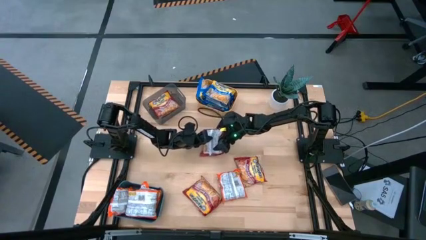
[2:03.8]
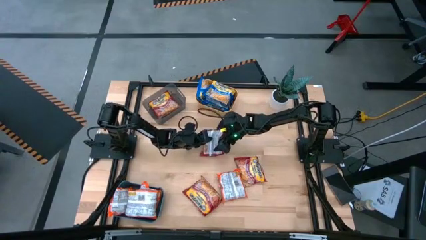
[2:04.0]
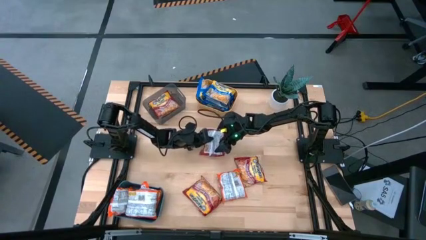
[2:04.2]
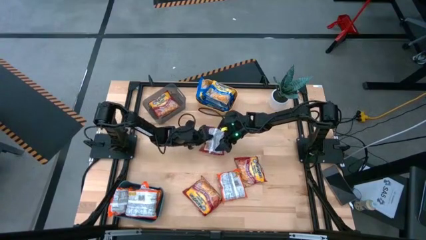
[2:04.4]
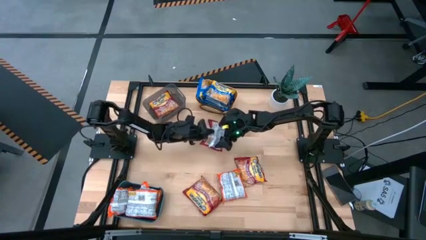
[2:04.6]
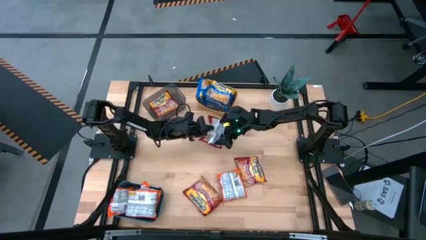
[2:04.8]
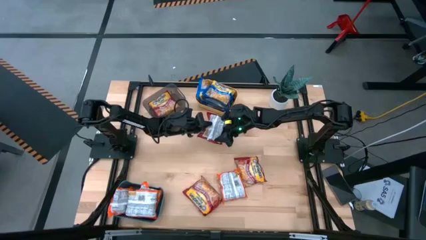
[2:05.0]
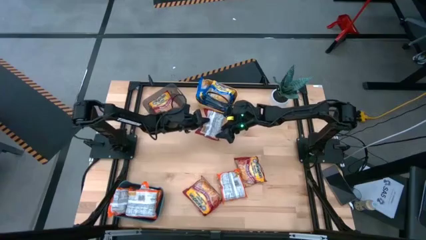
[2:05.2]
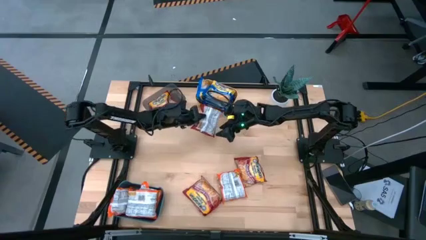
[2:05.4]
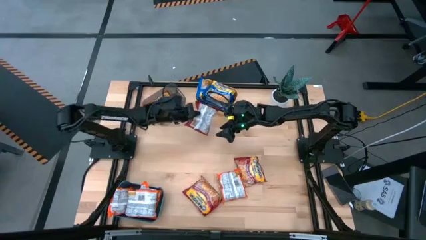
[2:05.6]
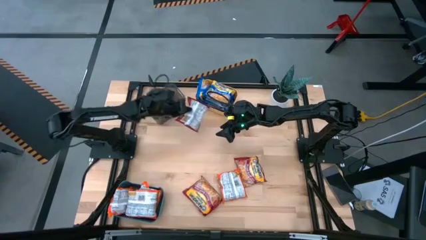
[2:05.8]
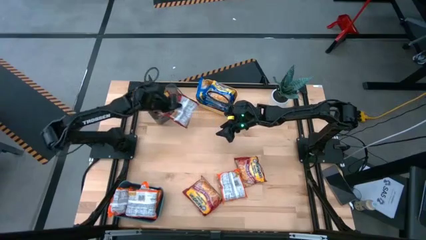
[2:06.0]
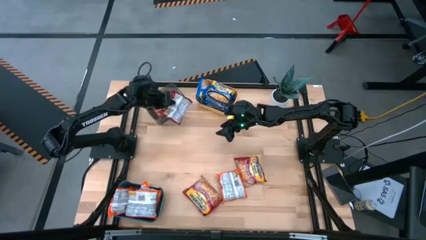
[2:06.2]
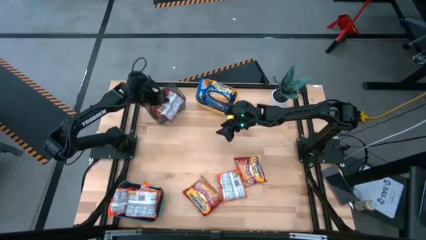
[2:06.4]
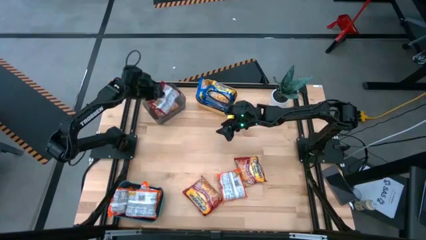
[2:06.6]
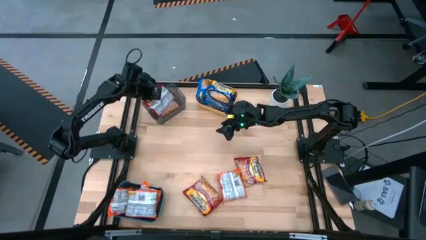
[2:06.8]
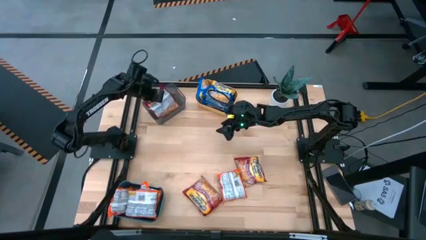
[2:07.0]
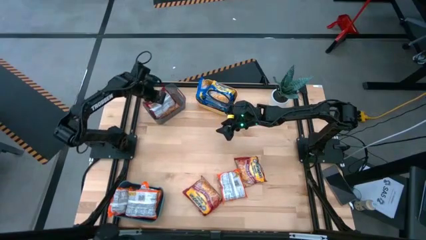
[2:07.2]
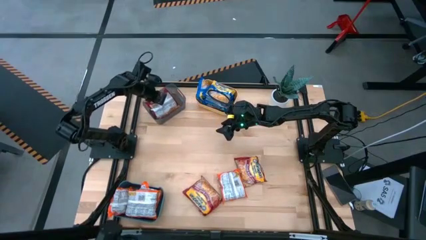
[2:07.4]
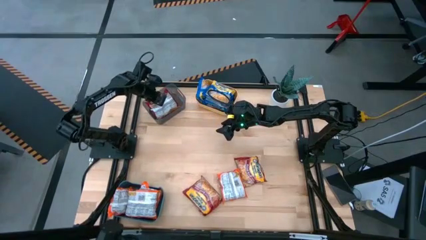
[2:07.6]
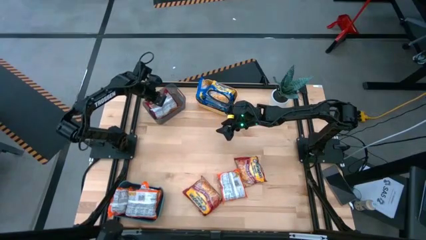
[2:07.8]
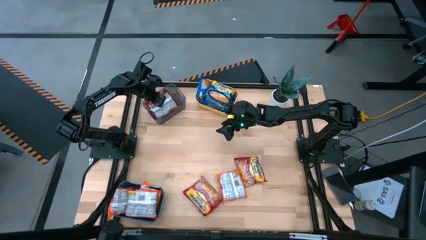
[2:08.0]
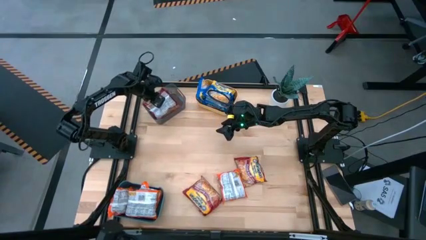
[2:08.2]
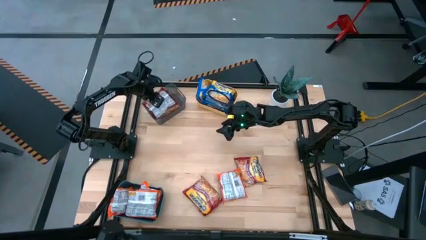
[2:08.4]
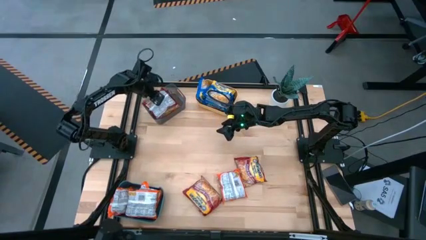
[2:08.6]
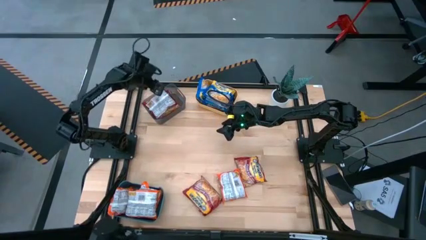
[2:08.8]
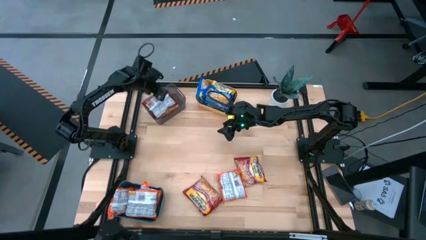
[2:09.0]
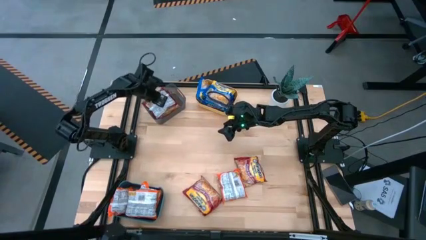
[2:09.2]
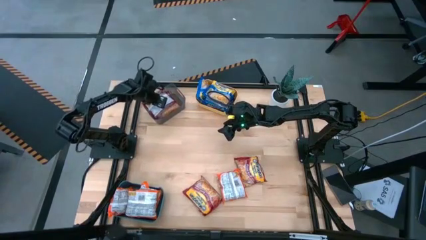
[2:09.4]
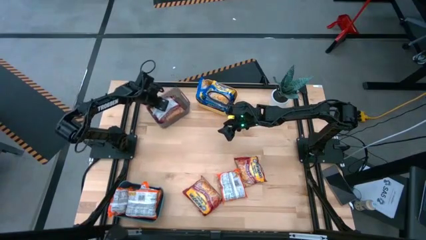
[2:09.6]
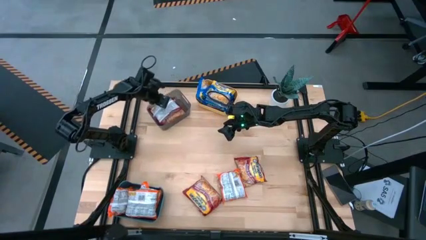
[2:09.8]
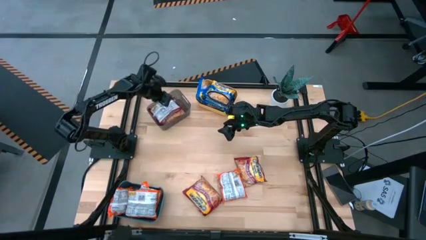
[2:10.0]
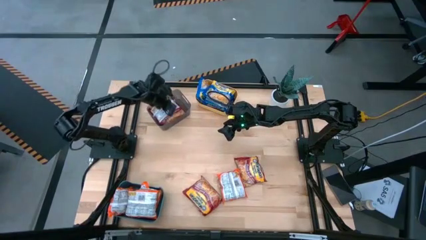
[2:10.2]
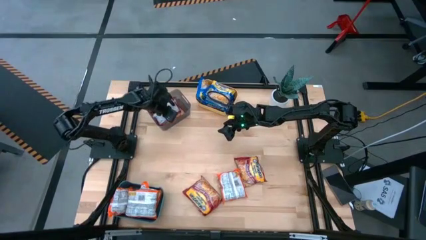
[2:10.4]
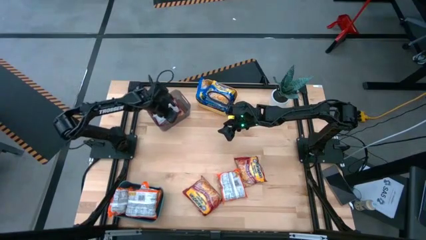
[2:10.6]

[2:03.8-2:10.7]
Task: Sort Maruchan noodles
Put the red noodle pack into the gray bin

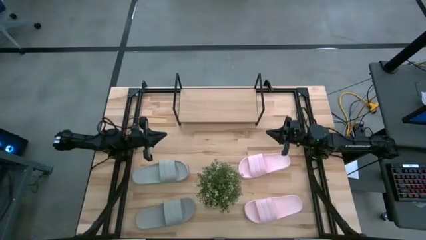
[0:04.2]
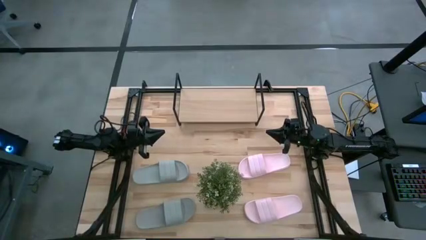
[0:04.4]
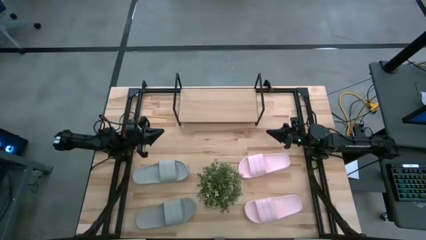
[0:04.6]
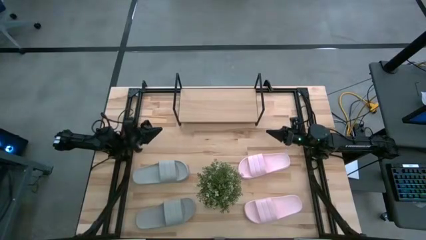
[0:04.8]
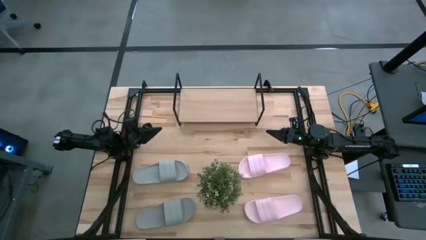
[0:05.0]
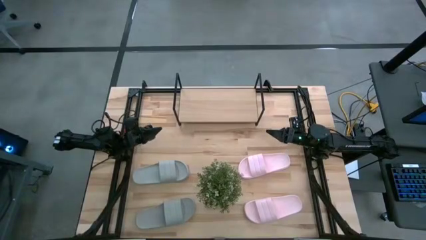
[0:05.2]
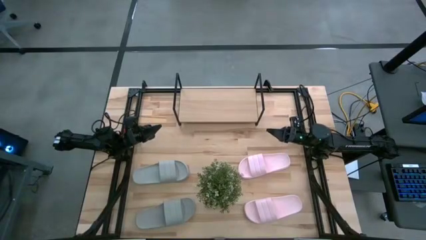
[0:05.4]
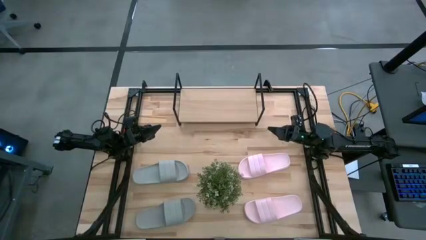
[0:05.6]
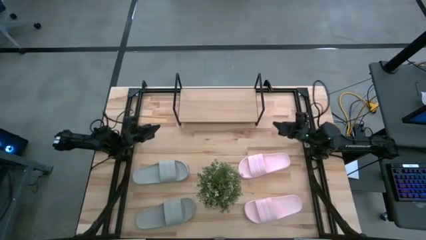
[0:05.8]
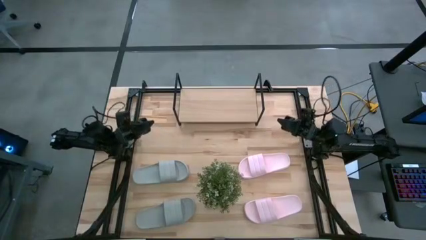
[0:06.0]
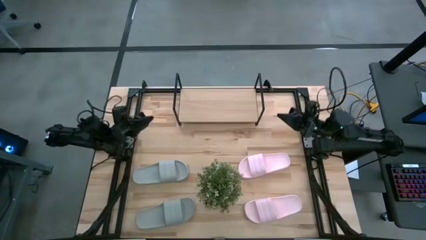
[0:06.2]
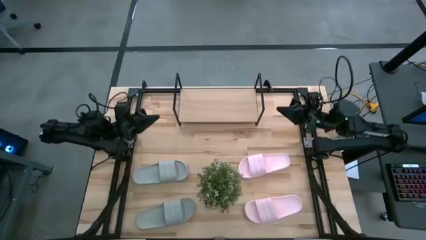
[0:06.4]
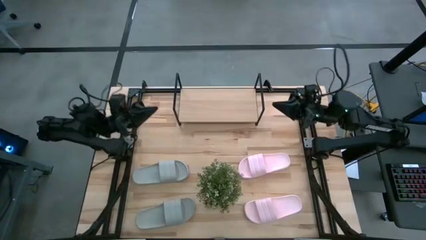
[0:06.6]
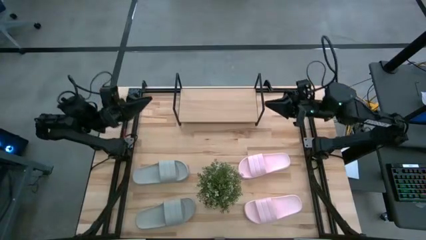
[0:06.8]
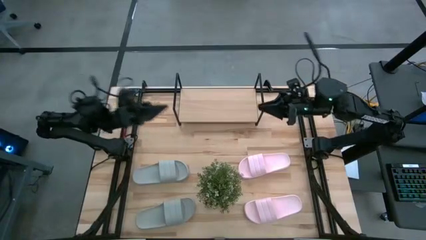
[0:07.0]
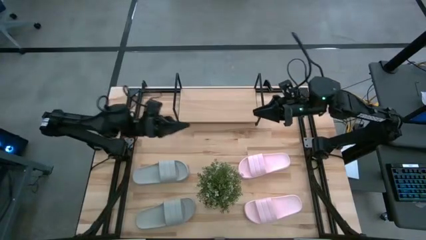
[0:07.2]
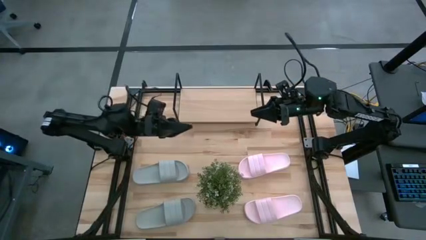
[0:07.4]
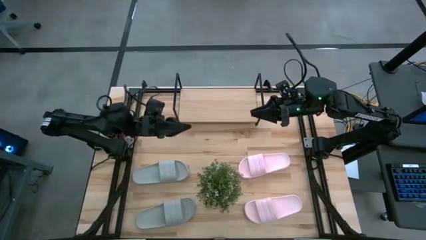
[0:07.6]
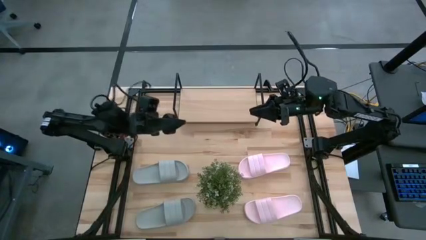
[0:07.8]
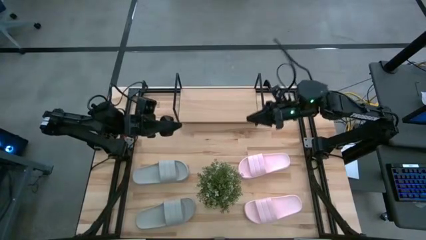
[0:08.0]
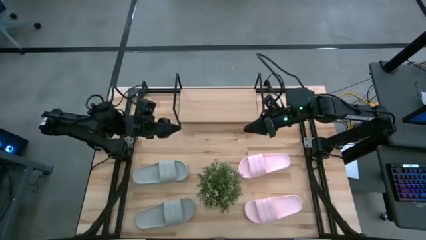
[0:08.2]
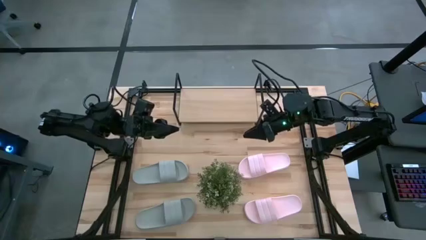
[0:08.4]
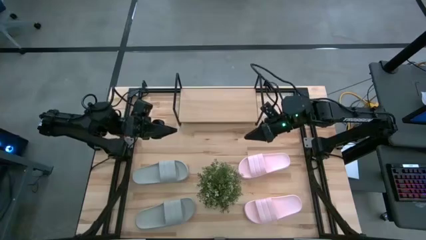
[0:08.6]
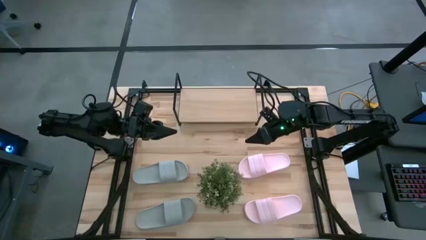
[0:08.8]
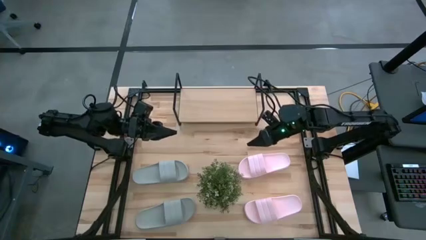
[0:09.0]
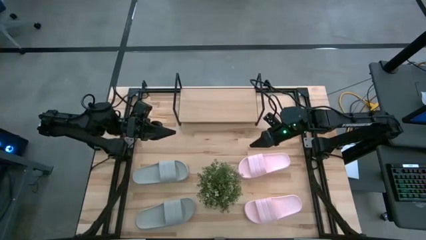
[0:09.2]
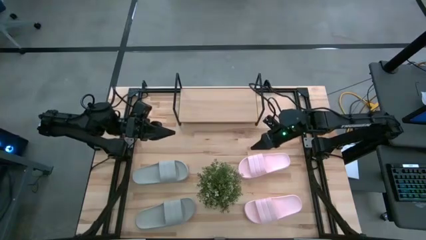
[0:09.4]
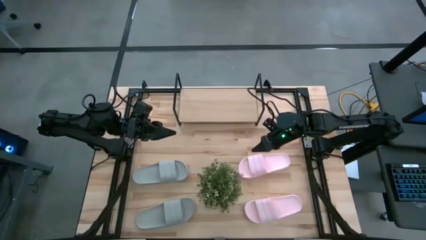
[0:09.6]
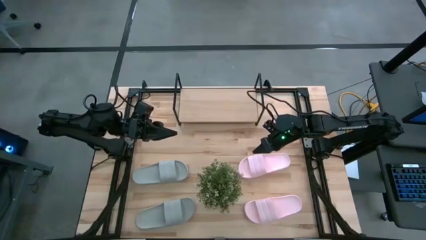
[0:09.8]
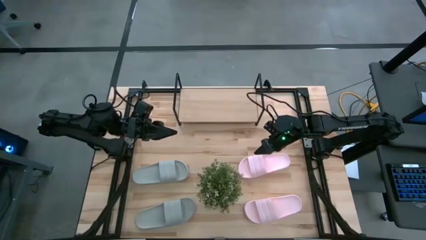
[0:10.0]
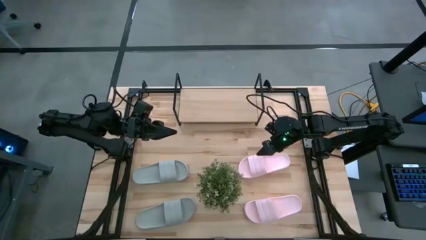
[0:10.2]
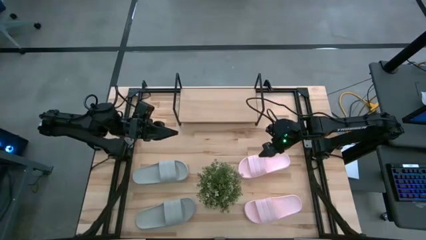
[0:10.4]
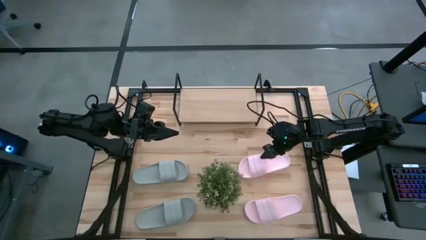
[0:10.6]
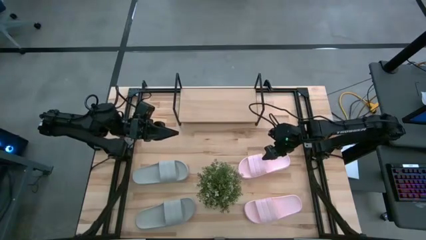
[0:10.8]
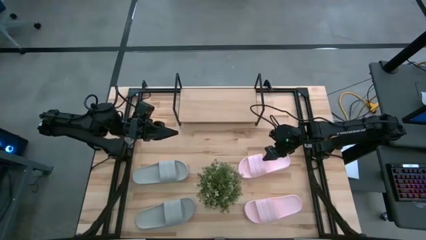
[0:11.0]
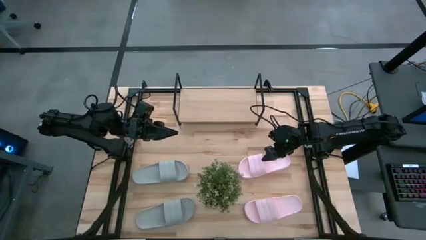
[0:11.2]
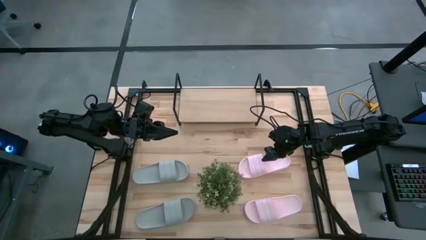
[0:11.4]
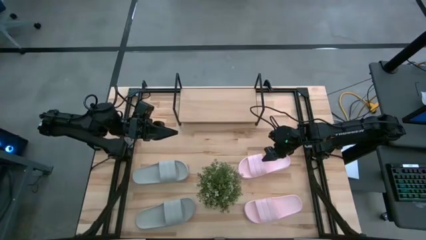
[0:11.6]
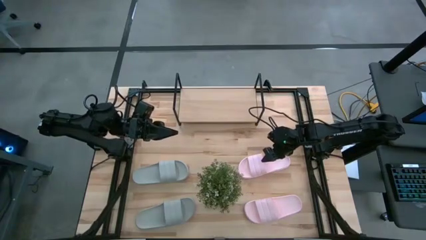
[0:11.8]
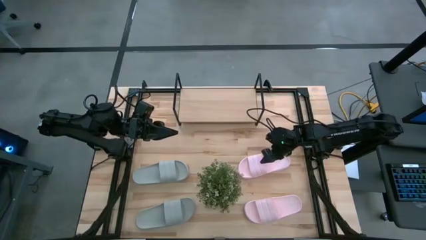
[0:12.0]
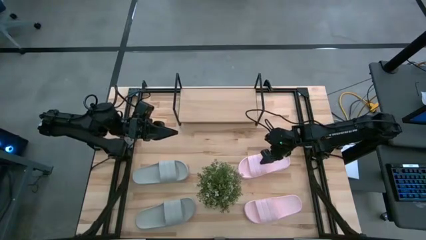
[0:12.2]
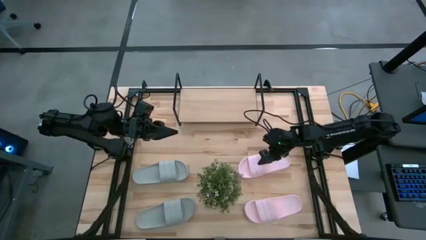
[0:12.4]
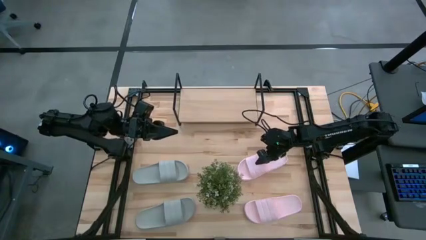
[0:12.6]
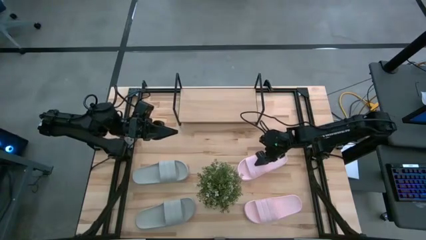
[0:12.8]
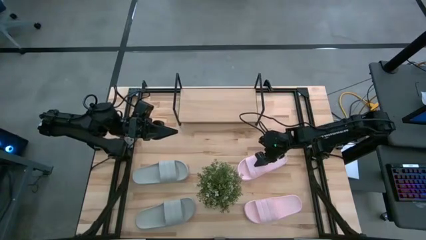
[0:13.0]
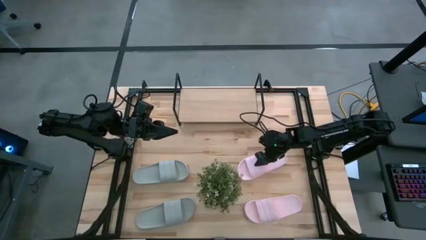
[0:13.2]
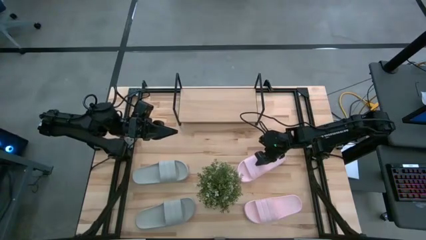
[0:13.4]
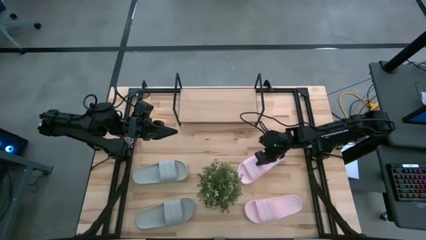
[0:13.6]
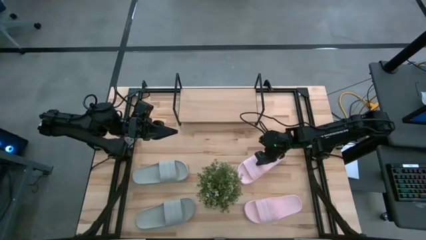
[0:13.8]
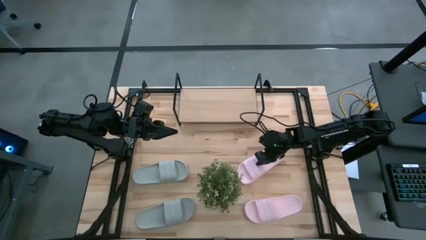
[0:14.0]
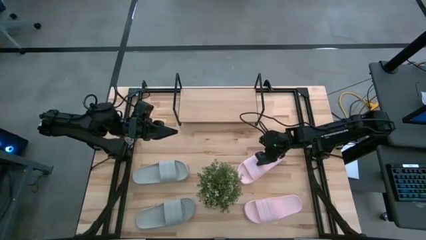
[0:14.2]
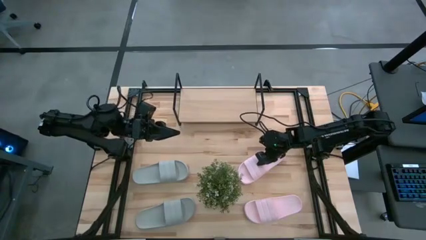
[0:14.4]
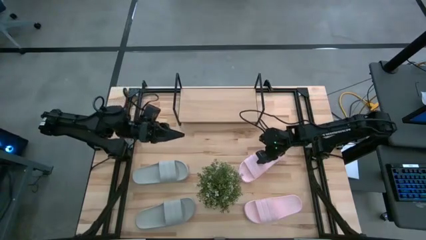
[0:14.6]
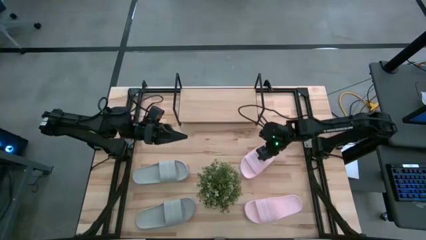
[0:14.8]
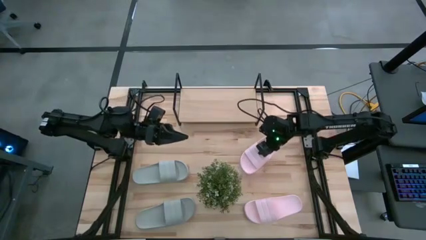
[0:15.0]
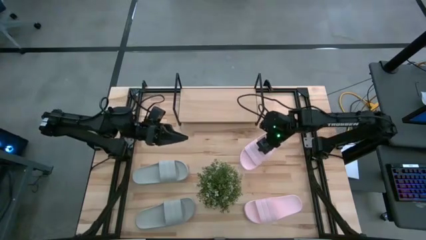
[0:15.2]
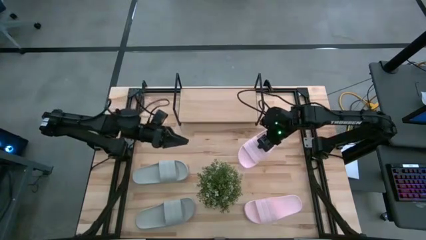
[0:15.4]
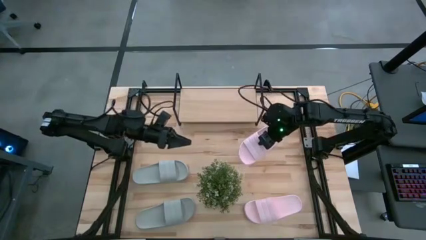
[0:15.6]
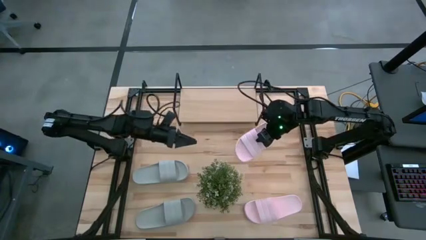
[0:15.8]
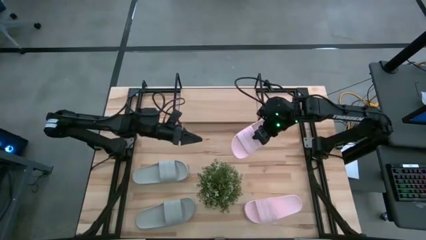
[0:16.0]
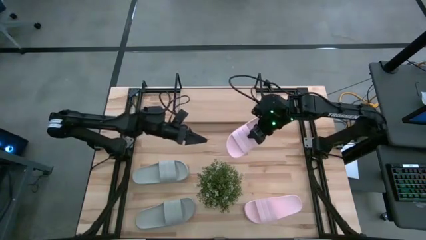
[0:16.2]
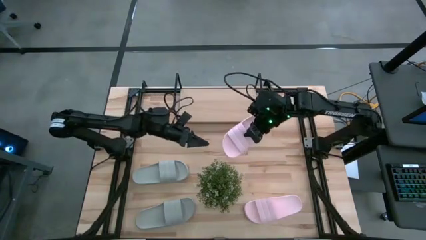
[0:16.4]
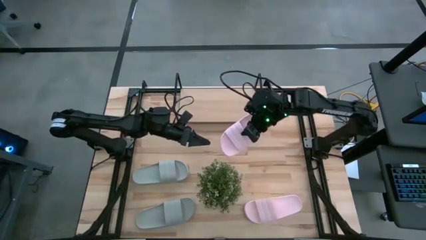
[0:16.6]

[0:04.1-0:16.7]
Task: Pick and place slides into the shelf
Put the top pink slides on the shelf
